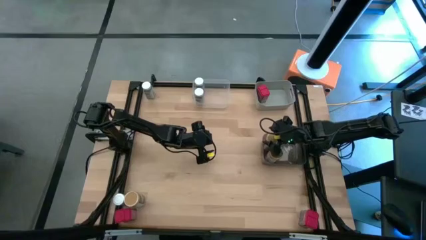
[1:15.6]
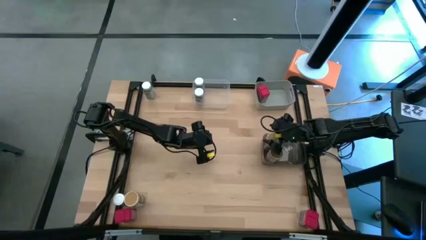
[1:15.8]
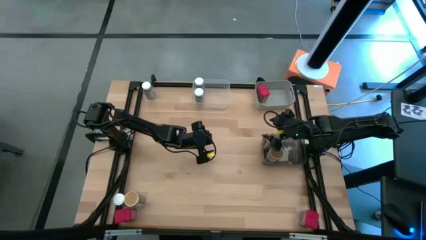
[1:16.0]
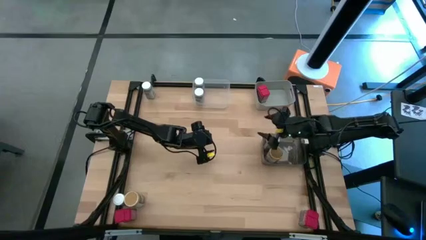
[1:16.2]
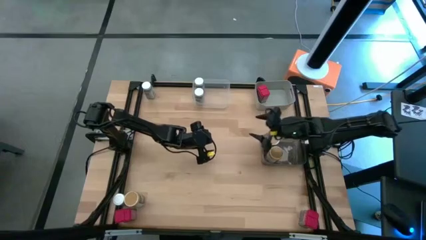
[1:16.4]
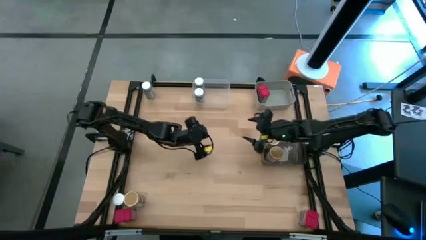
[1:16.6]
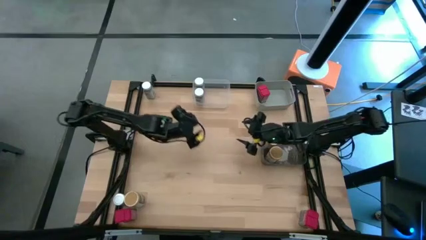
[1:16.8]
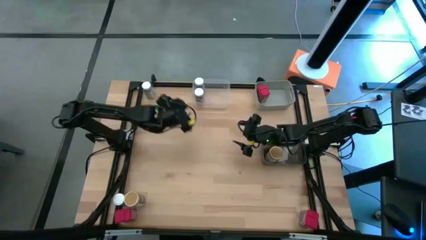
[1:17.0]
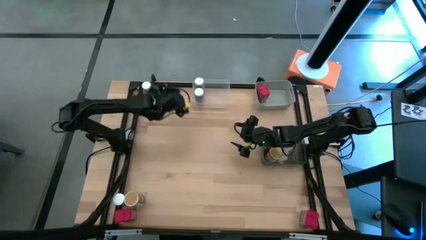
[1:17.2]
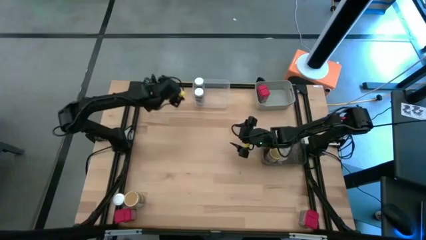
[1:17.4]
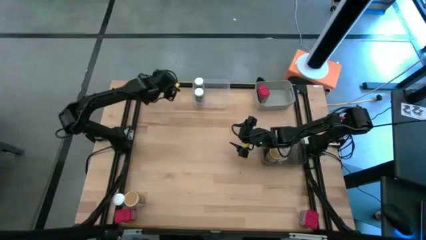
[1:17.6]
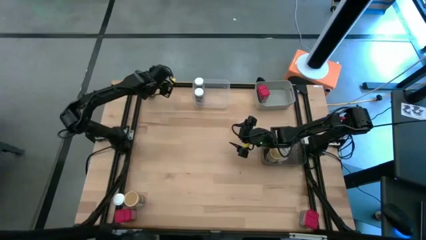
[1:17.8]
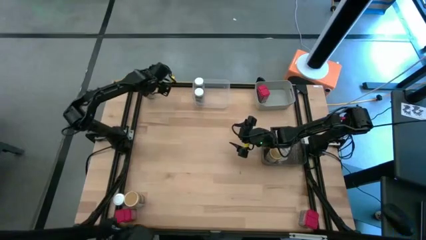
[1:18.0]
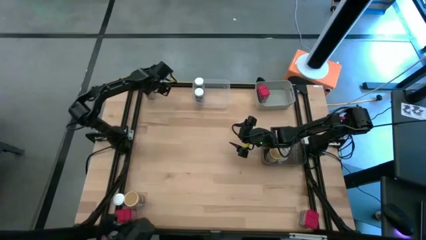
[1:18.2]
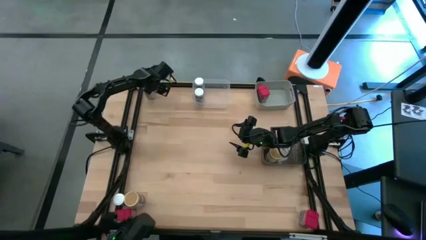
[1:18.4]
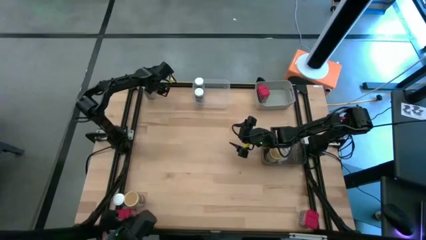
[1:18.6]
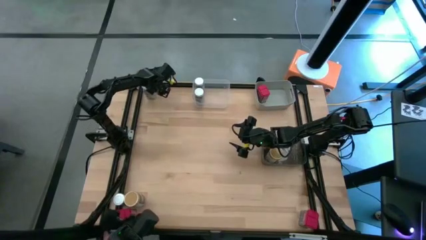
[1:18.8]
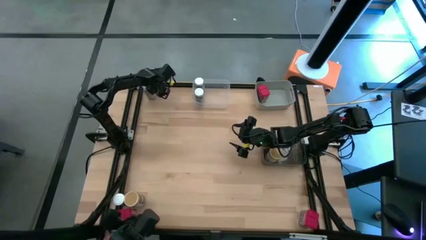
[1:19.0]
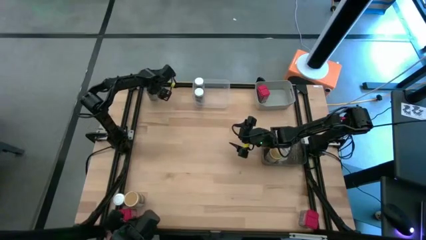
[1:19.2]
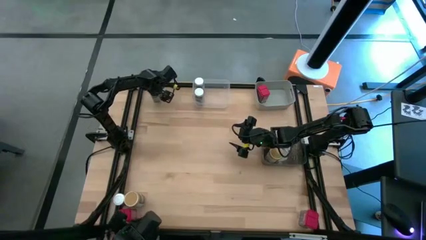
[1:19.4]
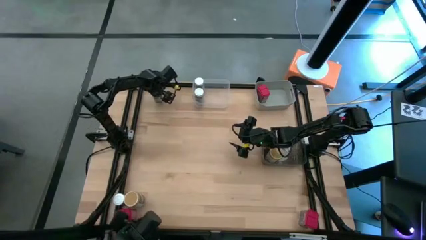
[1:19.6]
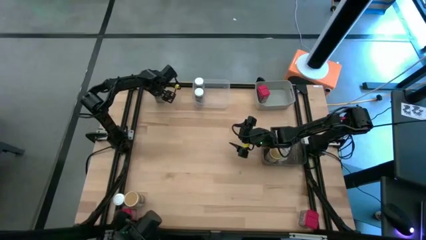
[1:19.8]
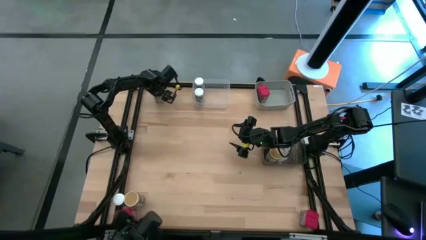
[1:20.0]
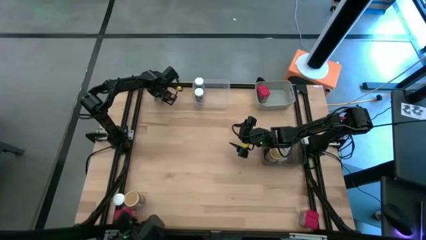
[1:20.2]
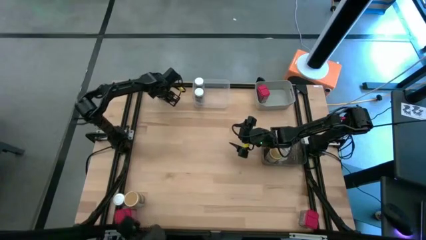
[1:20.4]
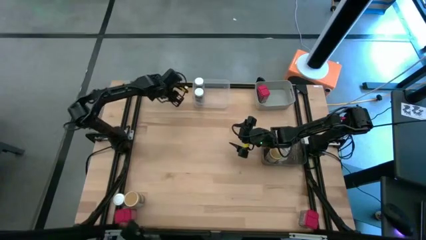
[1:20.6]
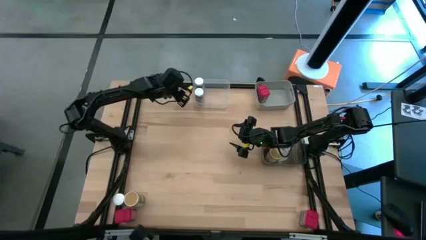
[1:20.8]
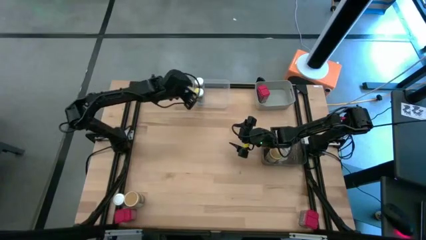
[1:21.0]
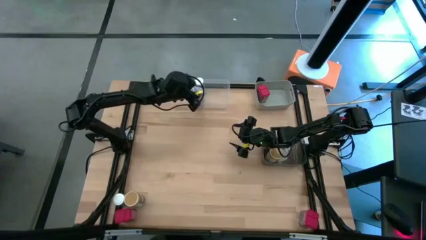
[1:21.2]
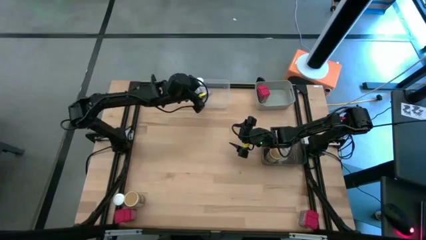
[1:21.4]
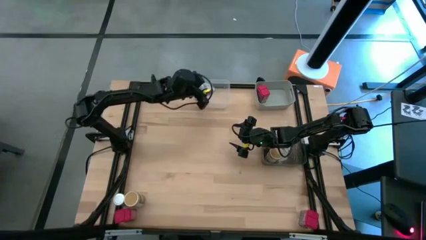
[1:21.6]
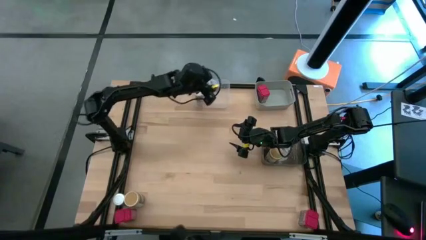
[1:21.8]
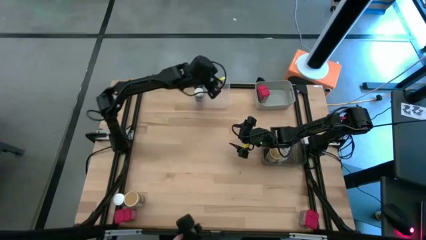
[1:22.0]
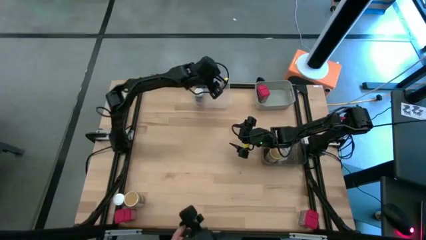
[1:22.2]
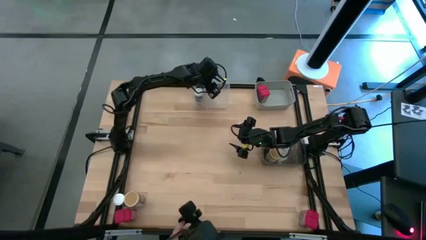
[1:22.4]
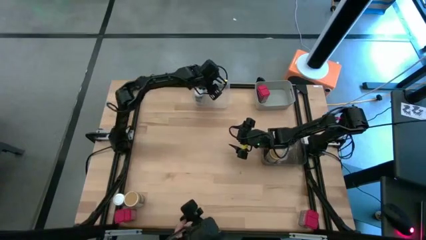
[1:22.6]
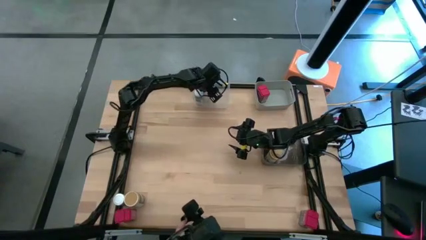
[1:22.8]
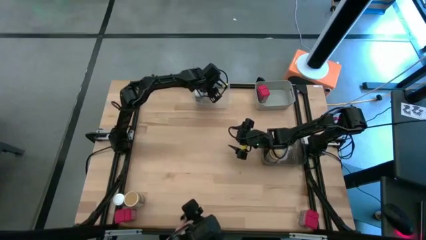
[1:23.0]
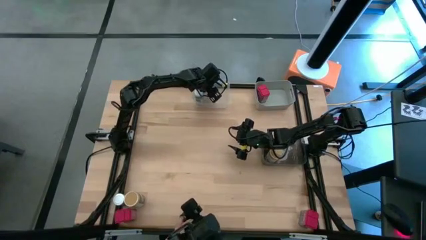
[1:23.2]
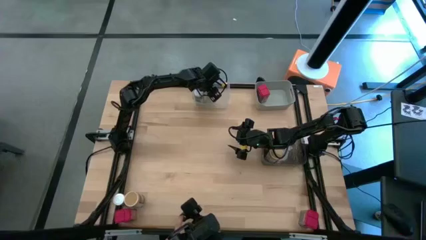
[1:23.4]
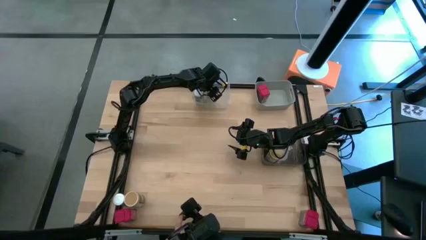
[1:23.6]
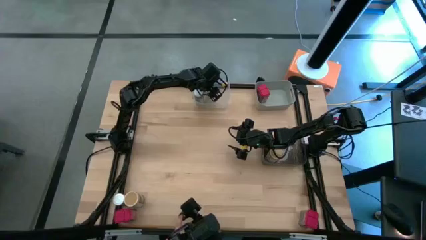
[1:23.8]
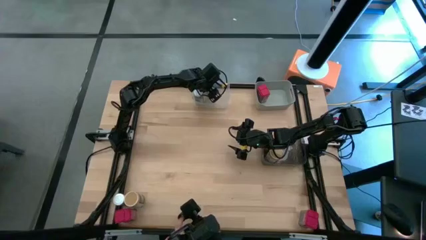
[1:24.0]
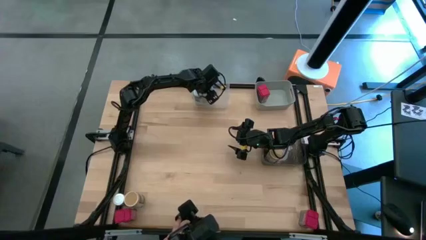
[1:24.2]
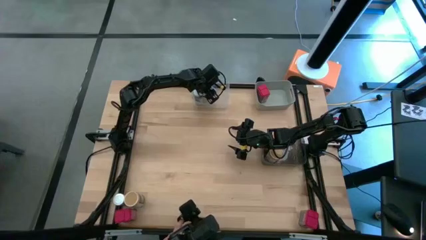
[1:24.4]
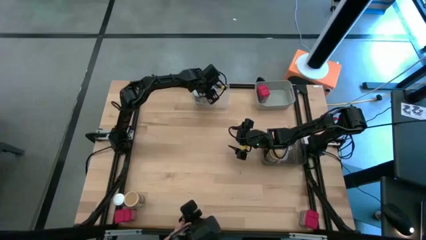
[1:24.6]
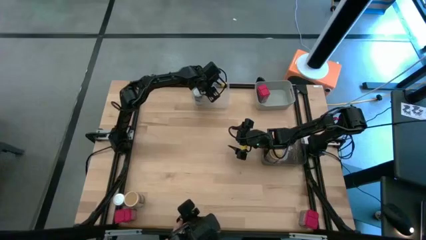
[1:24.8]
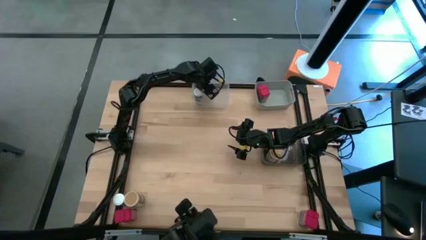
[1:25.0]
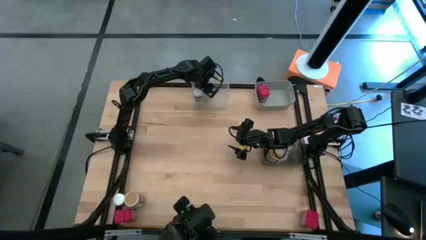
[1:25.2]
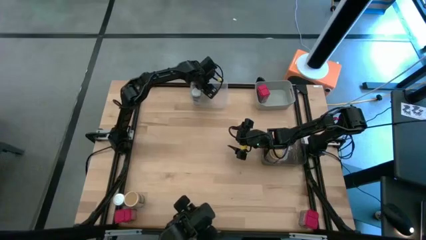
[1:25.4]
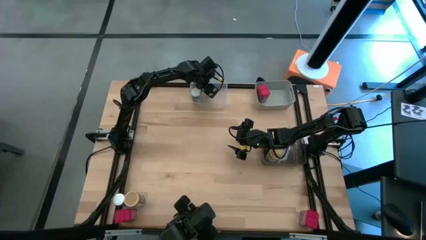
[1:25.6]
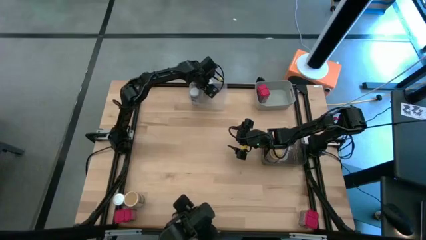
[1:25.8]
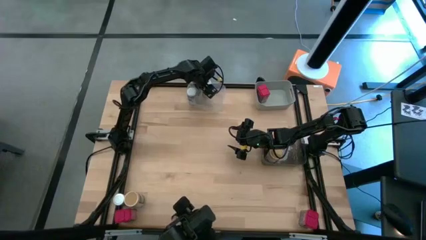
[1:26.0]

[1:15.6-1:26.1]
Task: Sort spices by type
Put the top white seasoning bottle into the transparent bin

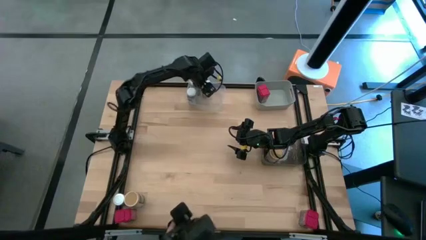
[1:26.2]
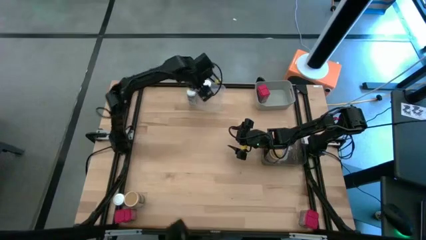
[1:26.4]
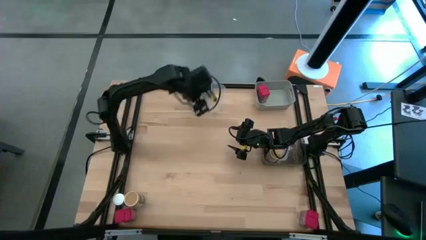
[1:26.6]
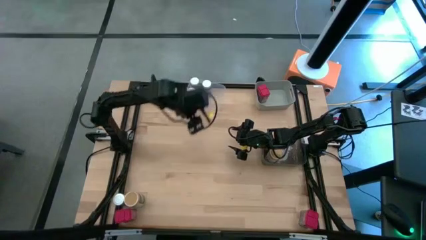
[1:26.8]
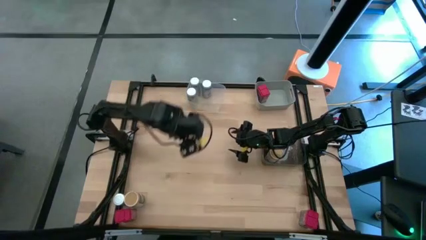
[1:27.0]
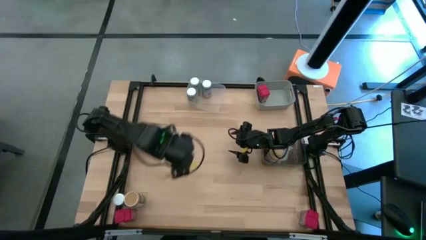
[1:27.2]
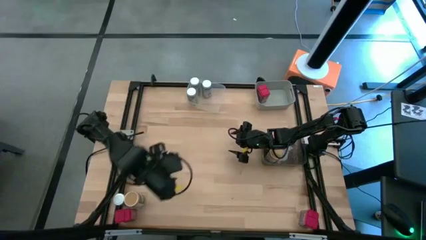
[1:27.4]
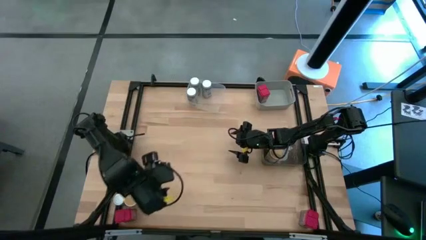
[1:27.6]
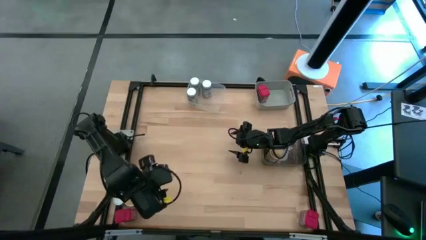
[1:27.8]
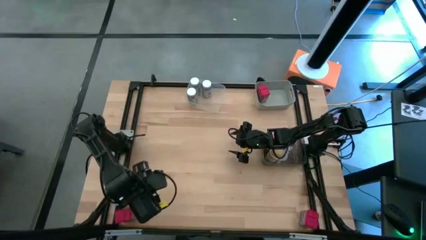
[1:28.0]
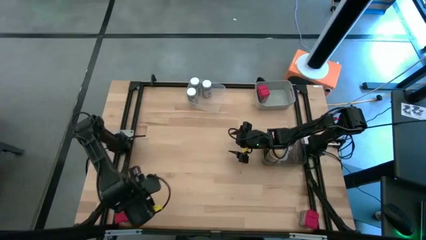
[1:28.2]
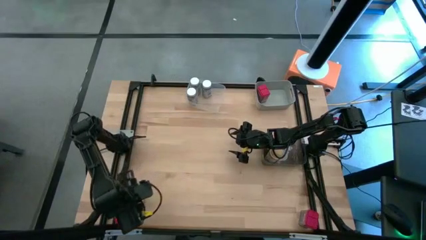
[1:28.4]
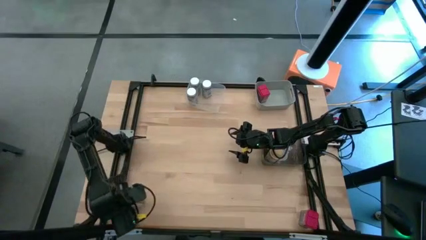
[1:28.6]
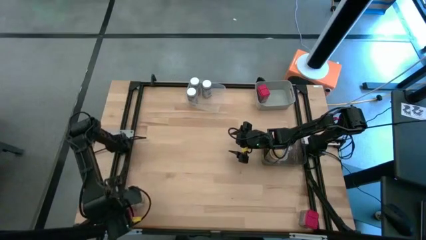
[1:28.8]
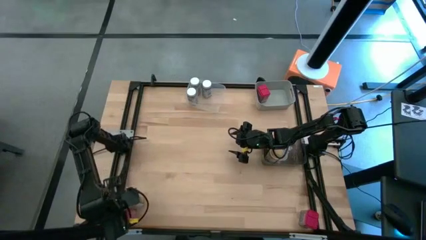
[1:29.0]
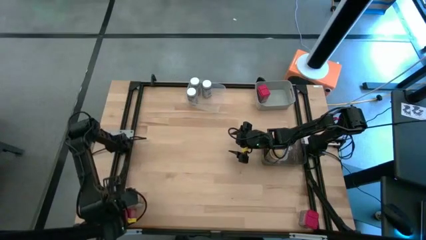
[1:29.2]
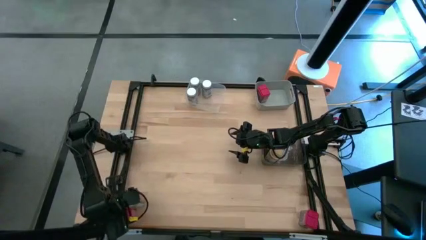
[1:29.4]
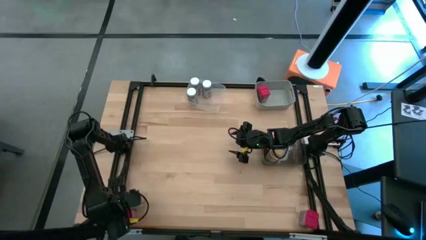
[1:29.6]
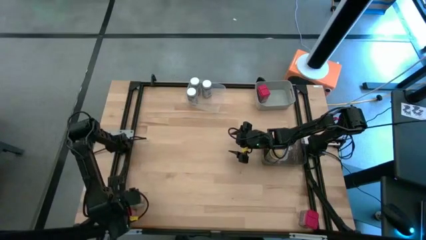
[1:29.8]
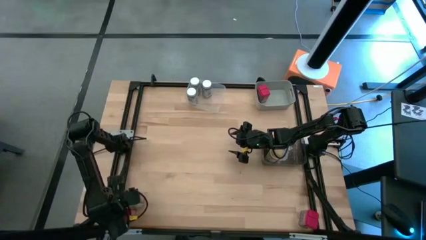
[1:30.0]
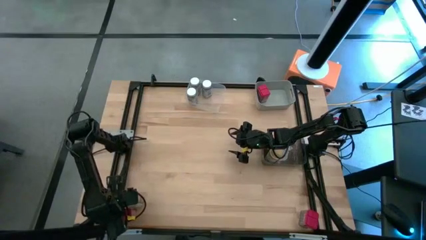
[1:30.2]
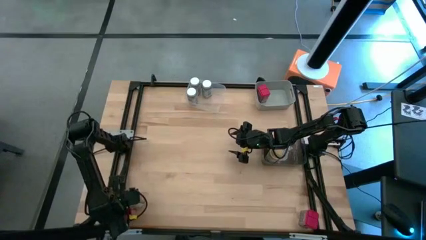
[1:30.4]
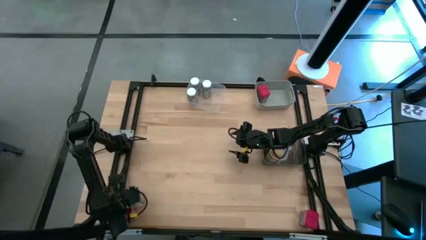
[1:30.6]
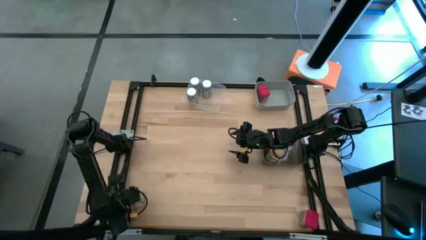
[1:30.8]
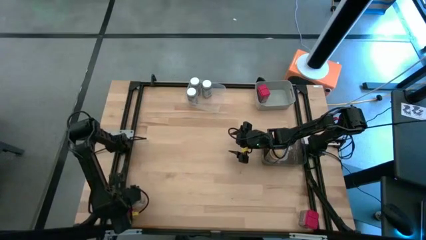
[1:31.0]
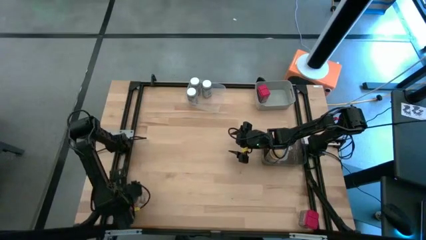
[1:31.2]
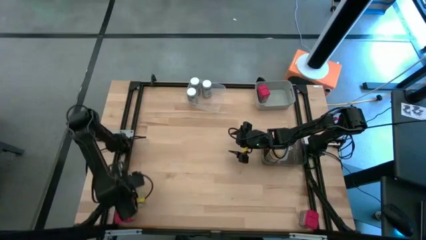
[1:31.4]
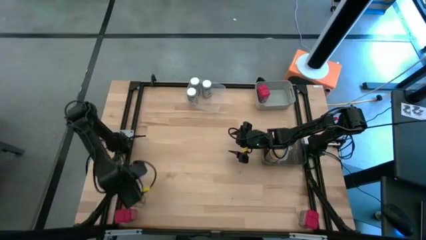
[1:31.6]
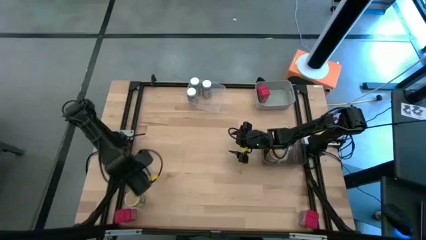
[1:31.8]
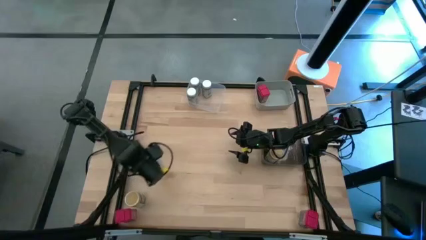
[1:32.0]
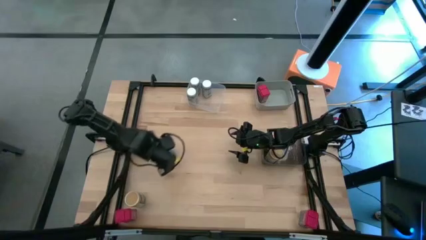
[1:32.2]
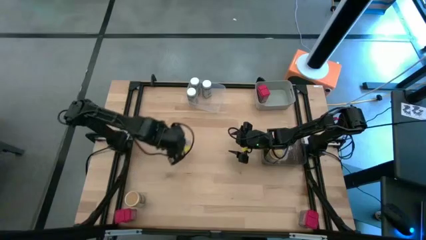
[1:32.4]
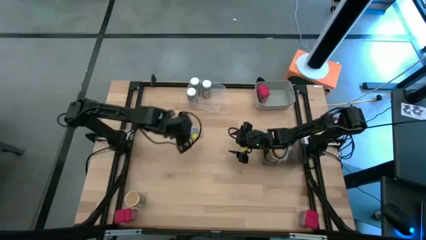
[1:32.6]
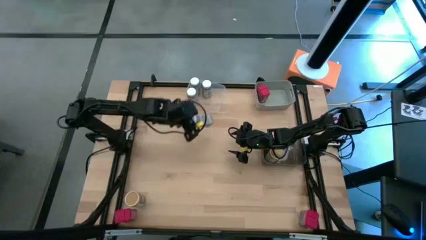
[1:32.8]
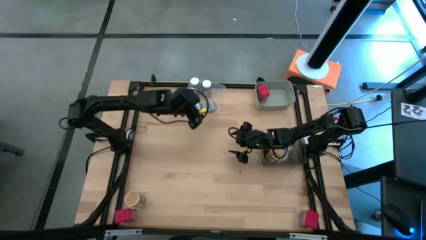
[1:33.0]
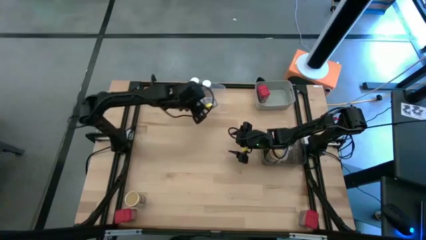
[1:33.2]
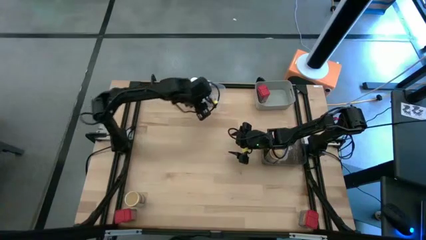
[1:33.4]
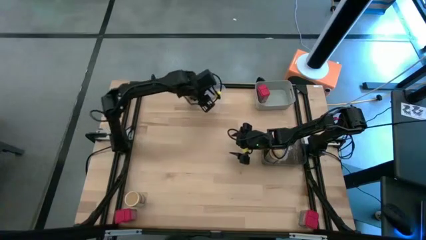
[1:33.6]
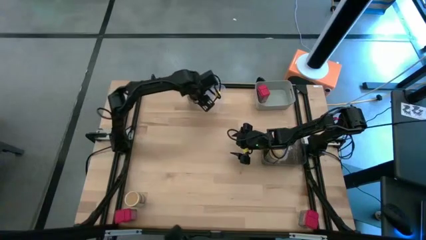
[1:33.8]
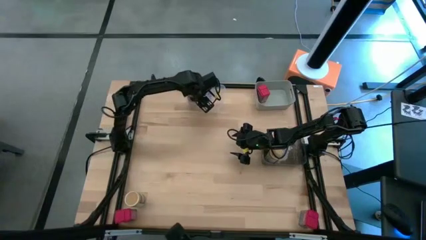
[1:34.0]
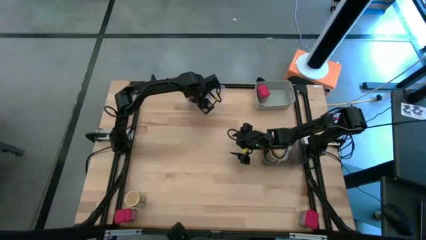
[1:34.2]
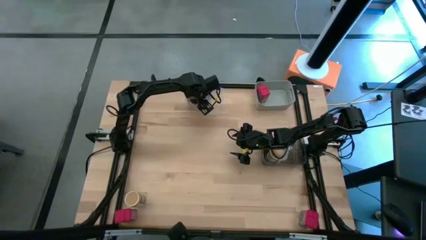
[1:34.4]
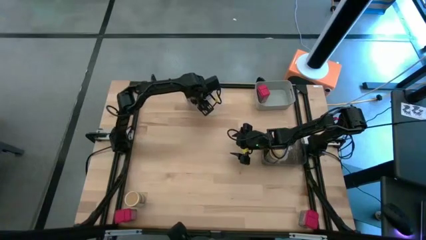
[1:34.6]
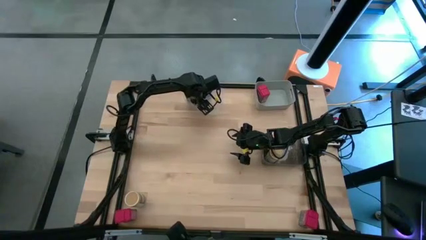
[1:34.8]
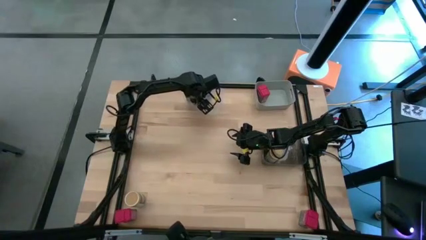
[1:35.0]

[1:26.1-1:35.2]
Put the white seasoning bottle into the transparent bin
